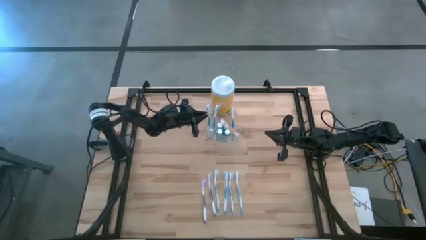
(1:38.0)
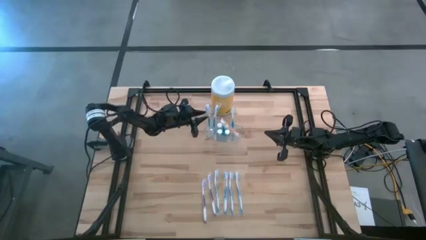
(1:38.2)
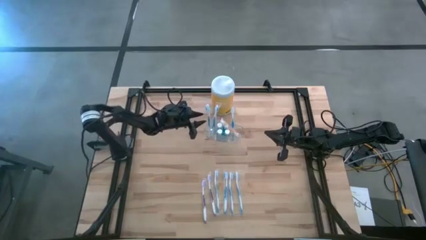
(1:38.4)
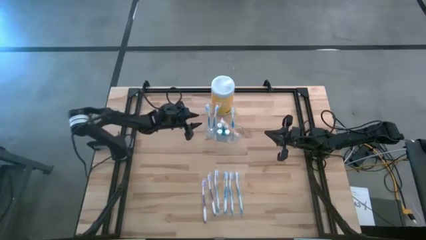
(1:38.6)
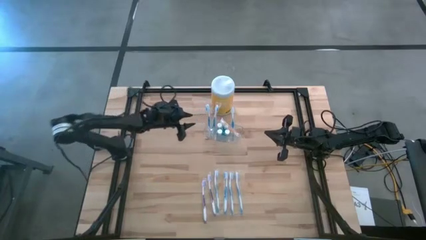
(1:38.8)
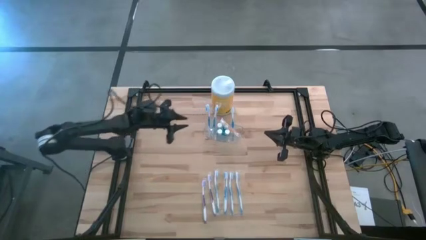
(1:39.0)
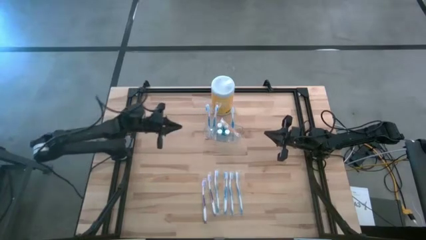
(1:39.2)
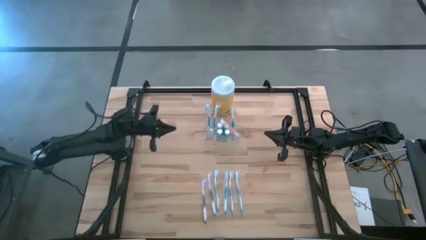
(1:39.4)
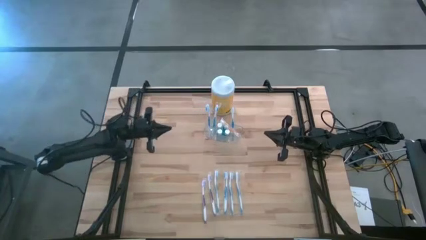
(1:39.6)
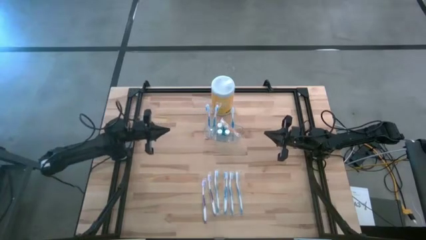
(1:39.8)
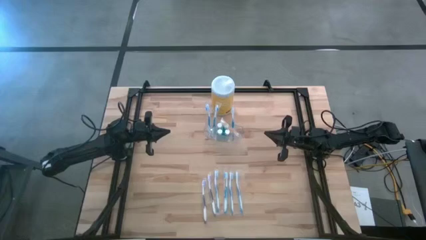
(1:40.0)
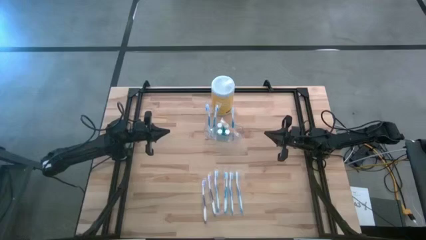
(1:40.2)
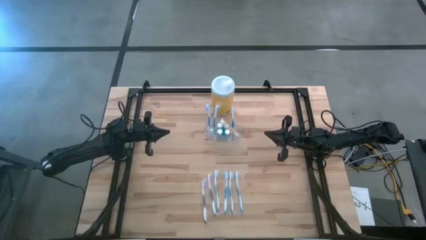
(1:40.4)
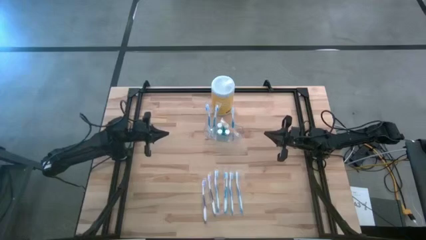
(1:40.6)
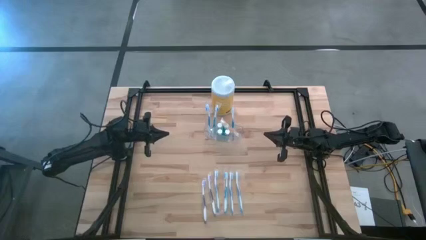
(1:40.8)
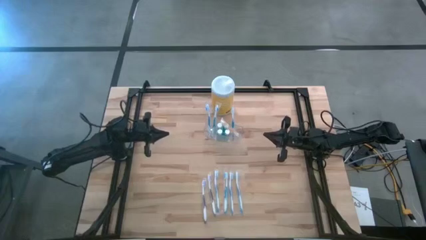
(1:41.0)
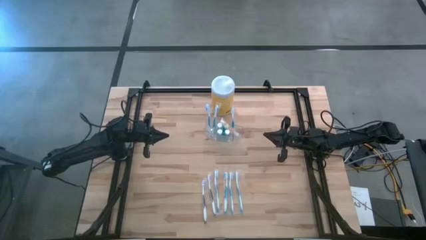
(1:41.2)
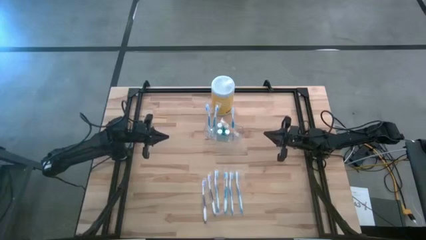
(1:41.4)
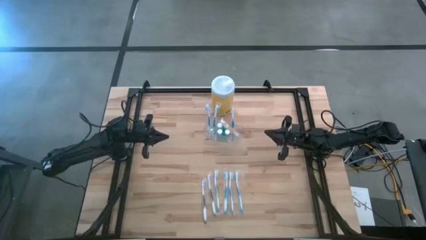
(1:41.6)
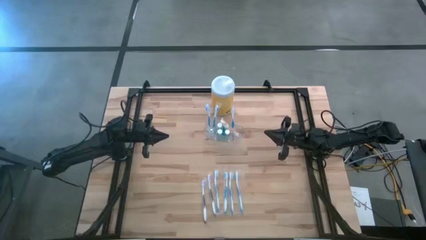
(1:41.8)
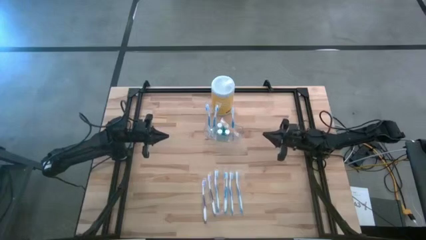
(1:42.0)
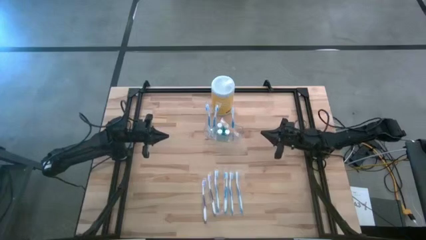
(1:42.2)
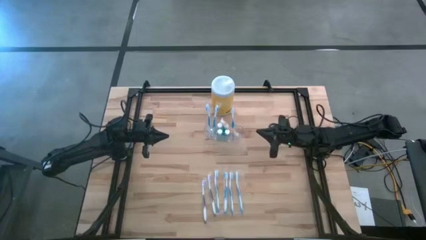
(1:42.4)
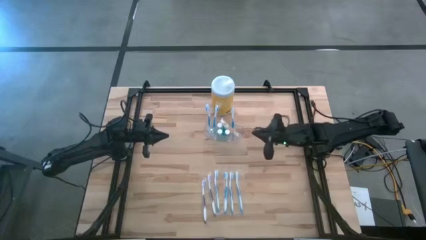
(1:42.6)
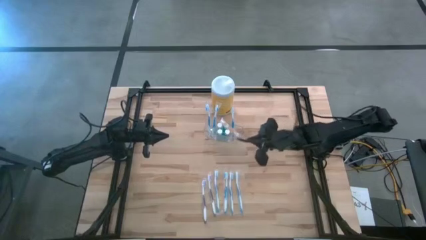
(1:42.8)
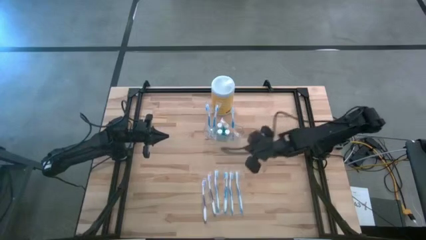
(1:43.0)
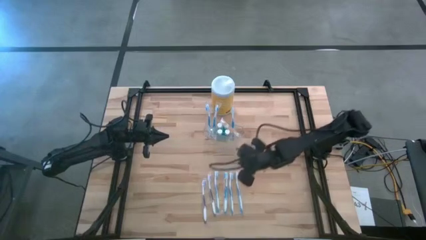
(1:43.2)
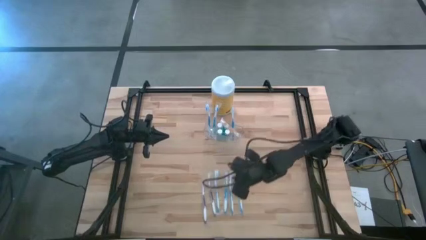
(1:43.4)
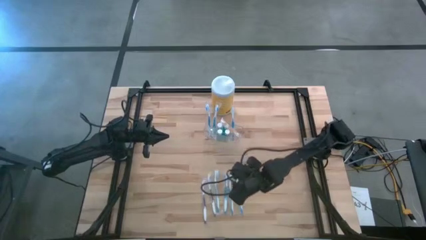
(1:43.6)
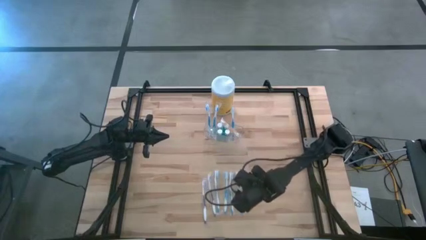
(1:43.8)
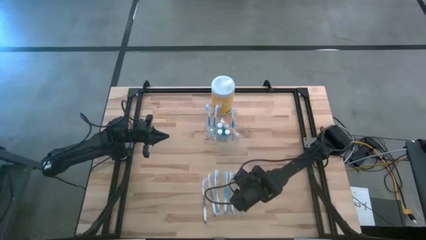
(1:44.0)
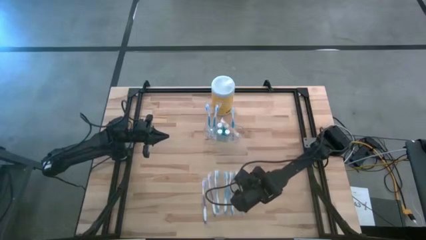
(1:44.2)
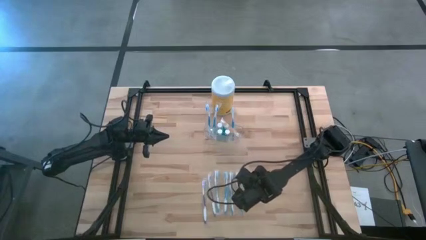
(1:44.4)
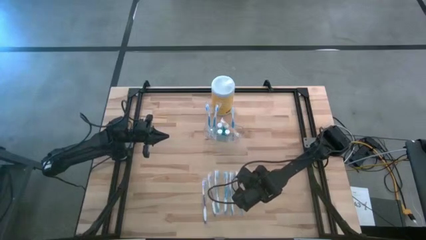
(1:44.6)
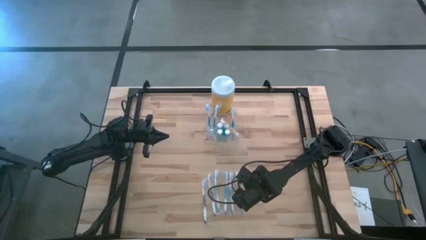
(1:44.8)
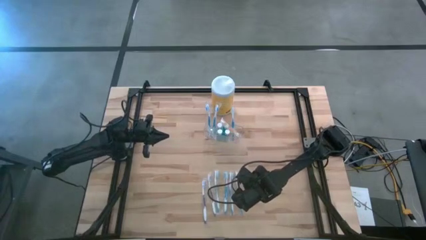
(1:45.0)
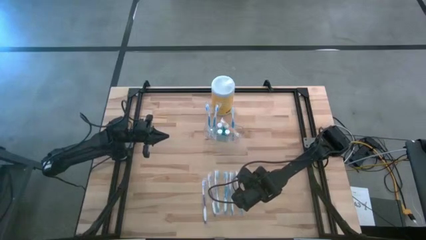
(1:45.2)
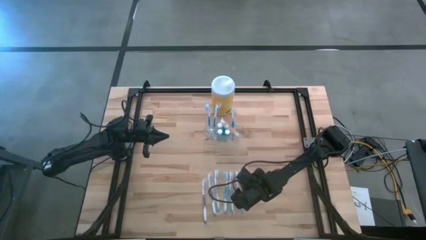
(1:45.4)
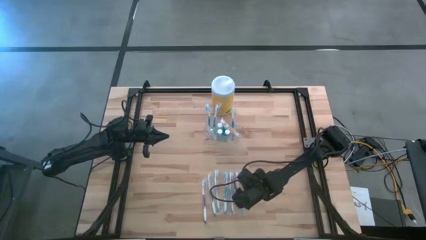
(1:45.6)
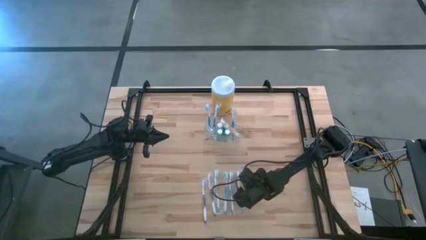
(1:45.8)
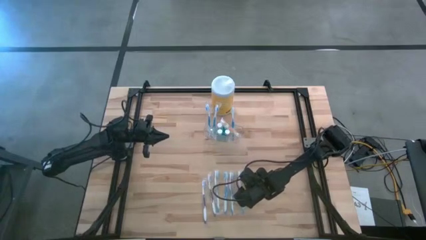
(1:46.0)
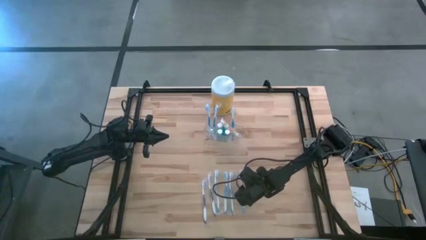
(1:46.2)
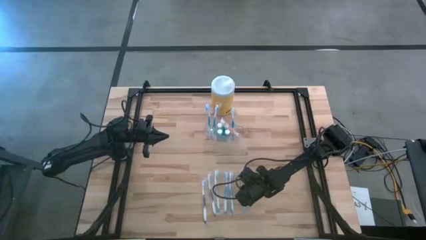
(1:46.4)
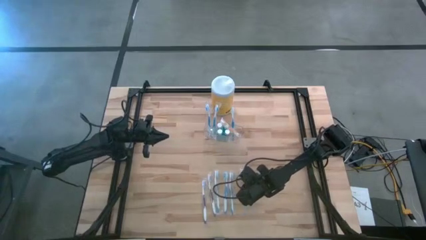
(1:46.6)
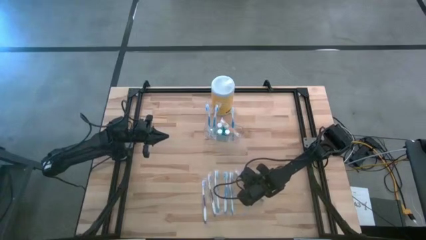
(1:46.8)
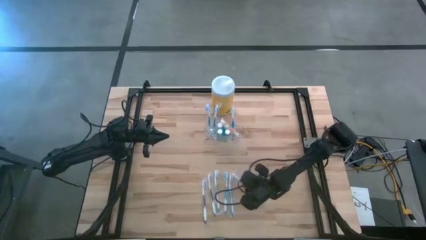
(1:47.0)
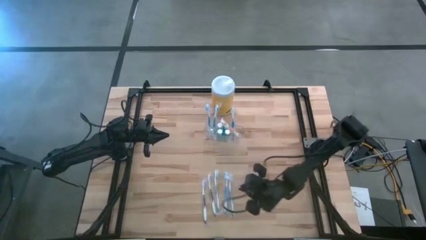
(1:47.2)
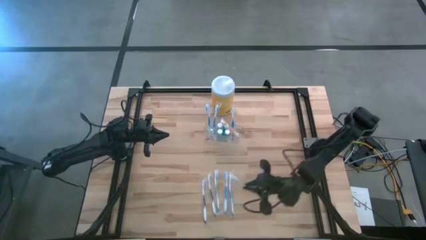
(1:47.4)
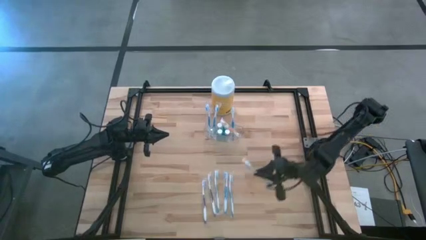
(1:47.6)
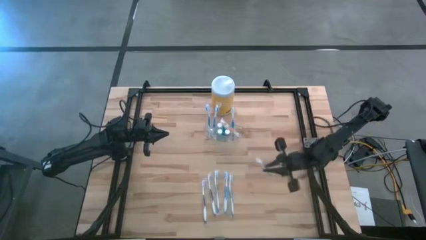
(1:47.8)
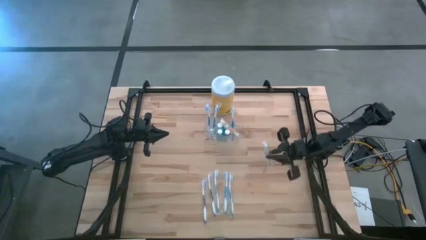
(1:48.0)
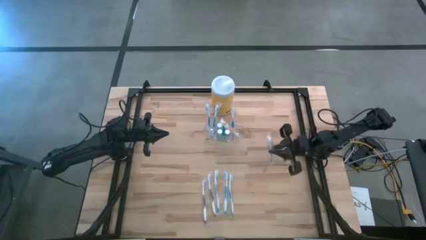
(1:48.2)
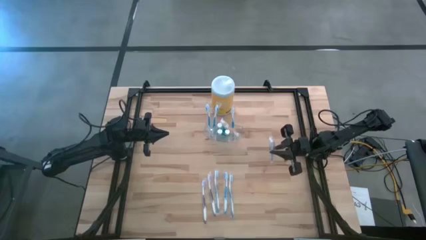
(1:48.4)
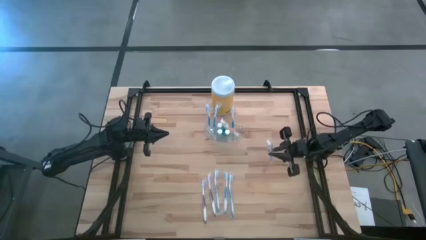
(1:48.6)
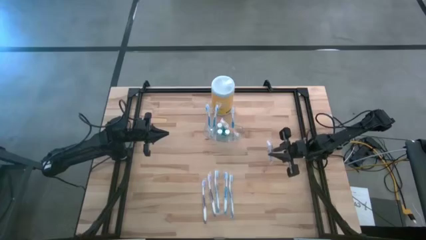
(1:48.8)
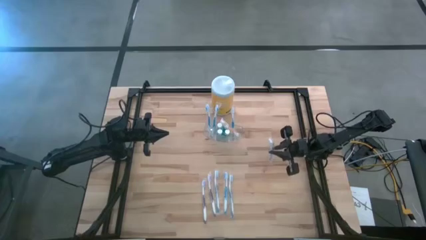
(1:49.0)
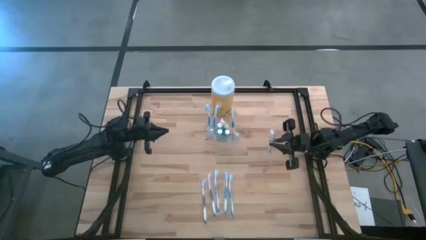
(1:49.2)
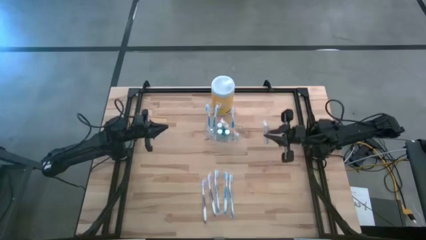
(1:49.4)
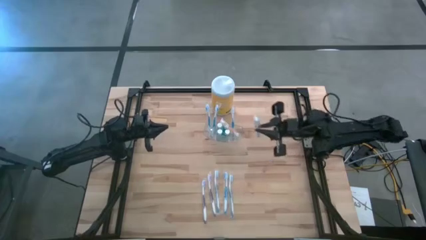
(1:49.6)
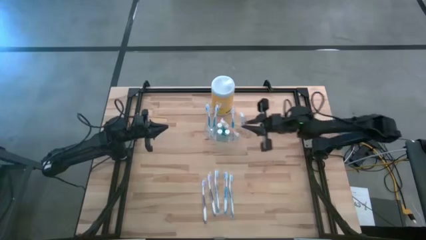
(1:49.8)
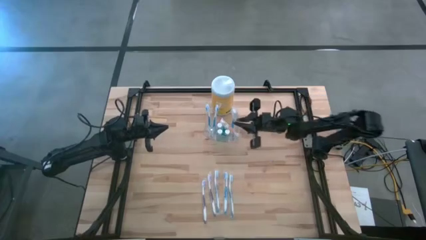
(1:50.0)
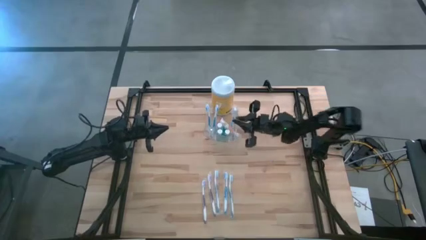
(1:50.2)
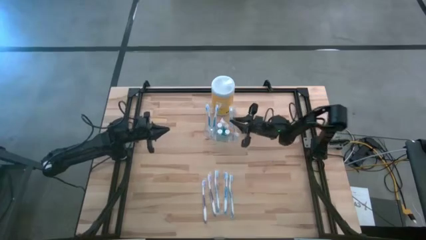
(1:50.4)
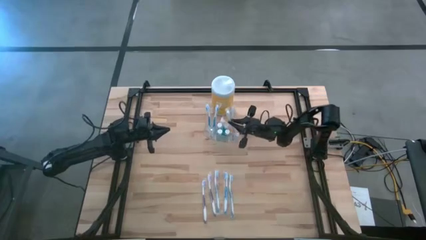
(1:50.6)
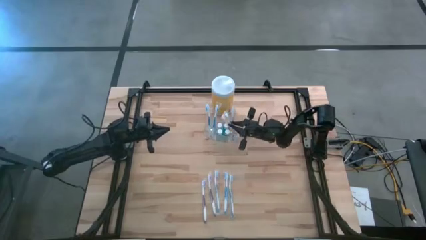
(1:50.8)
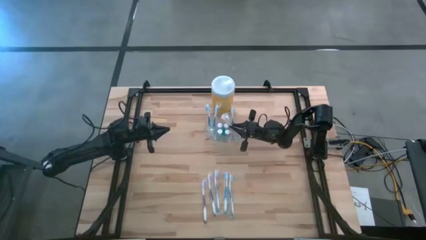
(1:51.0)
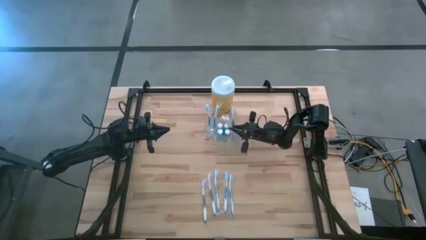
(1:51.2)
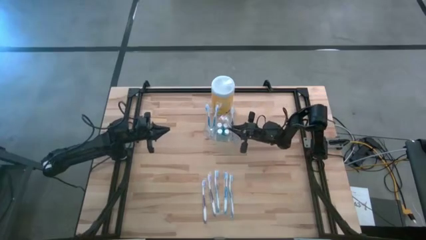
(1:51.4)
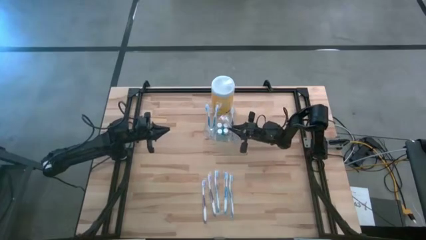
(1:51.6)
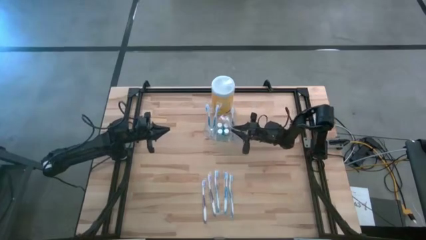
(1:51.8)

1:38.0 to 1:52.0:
Task: Pick & Place toothbrushing station
Put the blue toothbrush into the transparent organizer

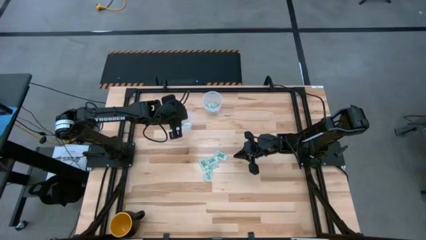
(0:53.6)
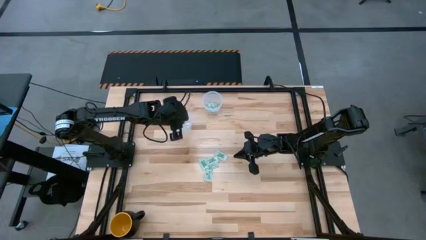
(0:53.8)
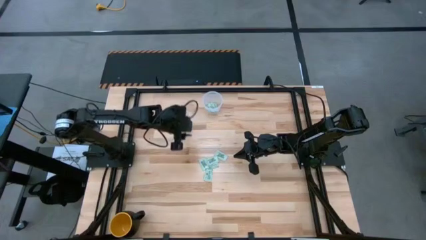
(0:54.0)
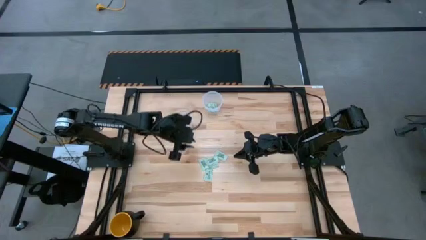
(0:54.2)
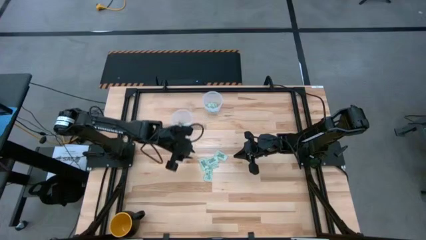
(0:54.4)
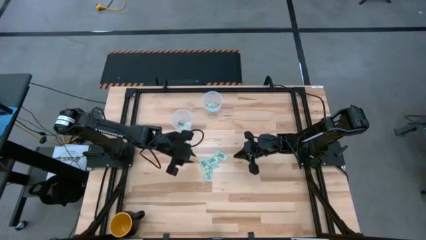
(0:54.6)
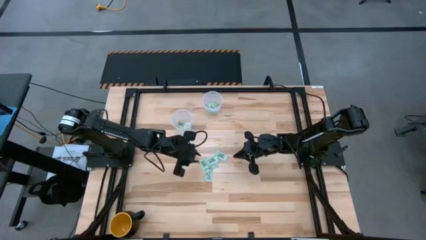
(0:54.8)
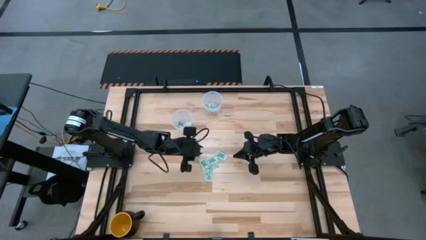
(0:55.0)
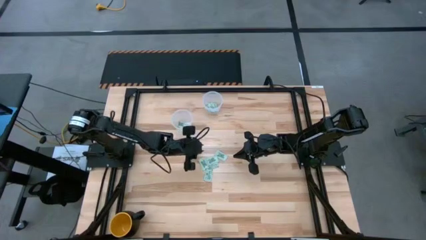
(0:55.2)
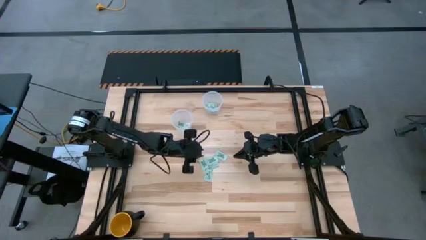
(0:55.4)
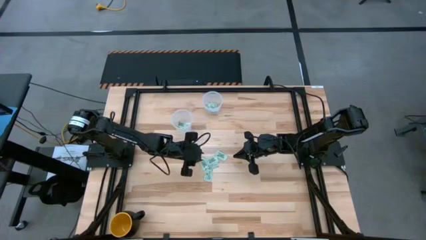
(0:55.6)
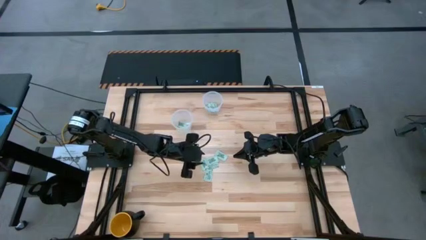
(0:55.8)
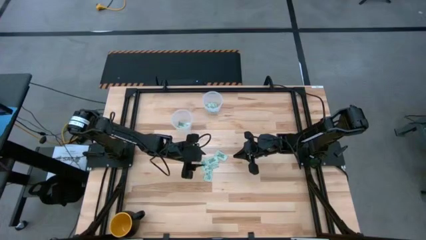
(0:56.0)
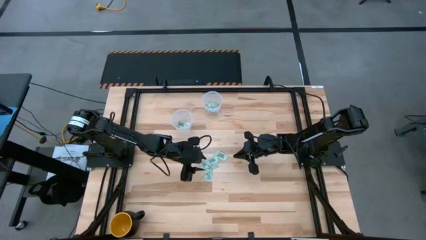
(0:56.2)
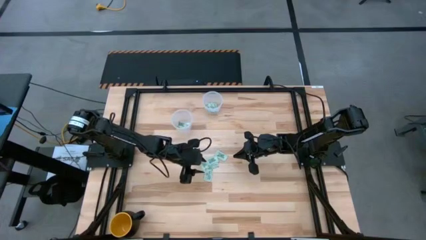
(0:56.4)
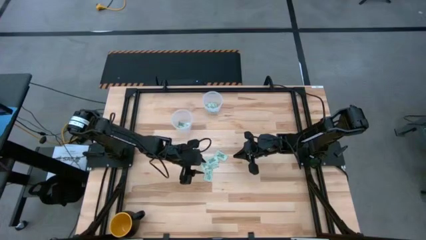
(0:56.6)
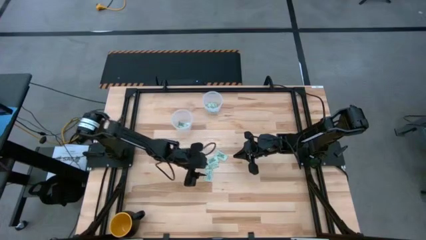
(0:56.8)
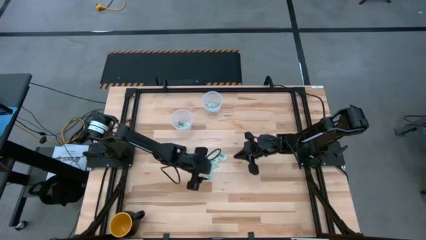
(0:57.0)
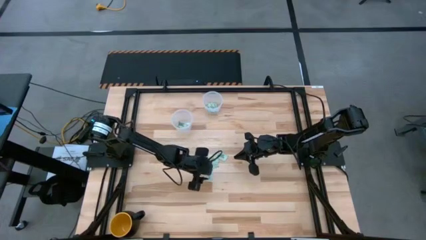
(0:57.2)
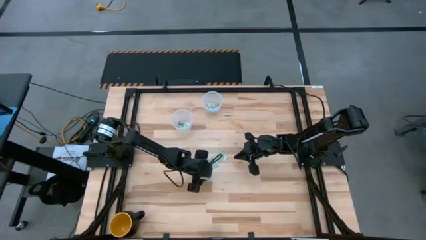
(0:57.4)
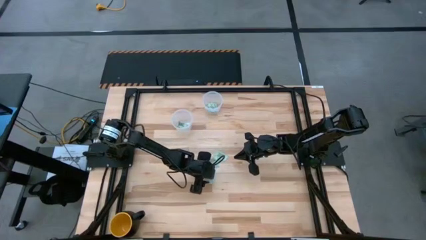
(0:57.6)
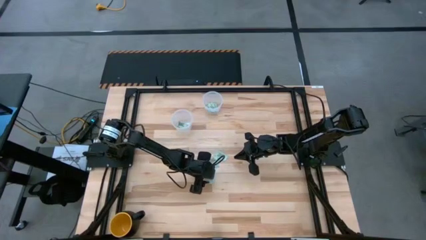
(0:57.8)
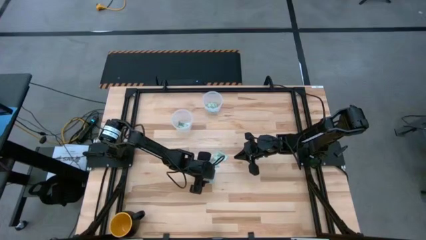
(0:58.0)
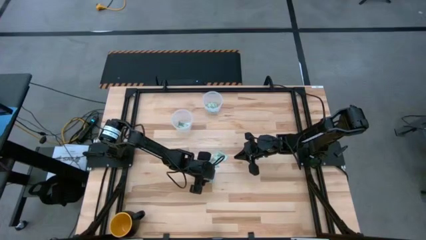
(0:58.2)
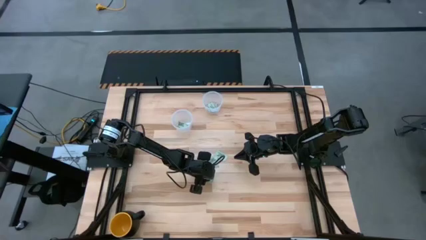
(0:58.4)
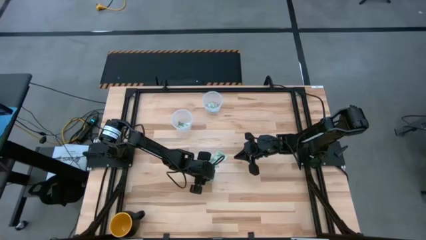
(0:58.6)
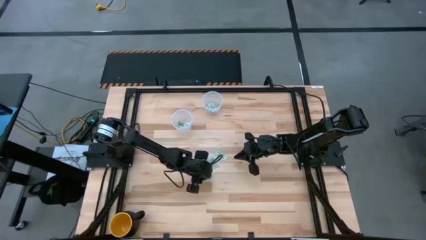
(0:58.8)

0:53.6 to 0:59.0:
Task: Pick and place items into bin
Put the stevia packet into the bottom transparent bin
